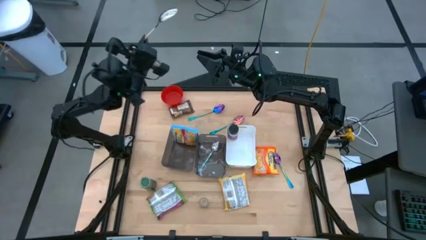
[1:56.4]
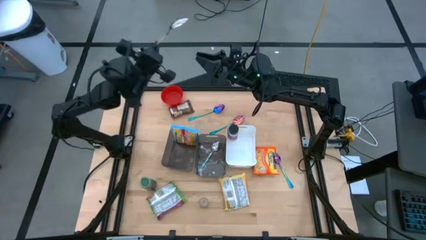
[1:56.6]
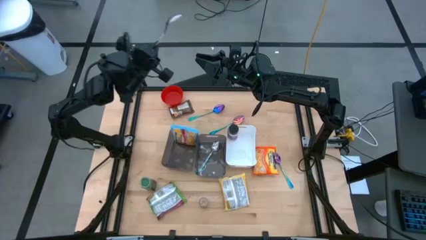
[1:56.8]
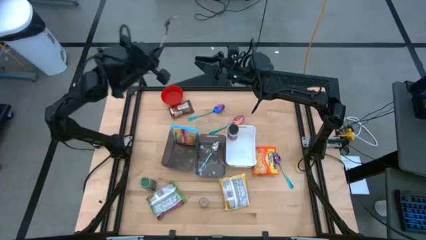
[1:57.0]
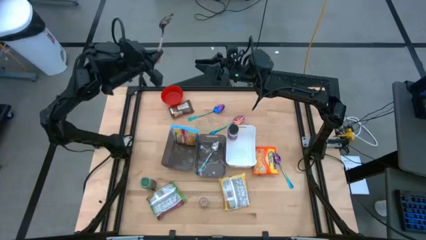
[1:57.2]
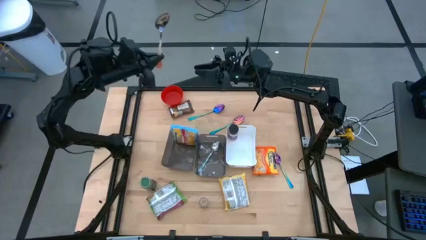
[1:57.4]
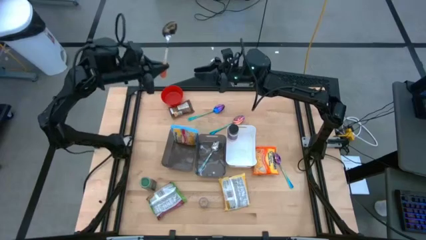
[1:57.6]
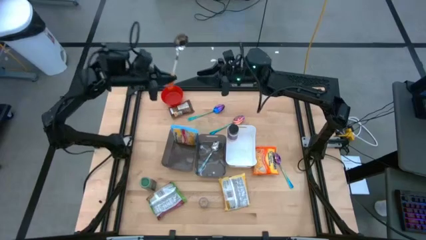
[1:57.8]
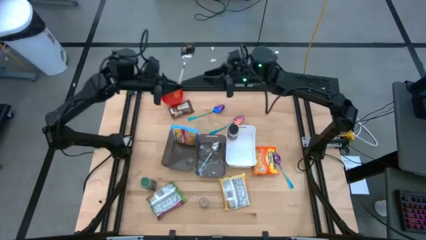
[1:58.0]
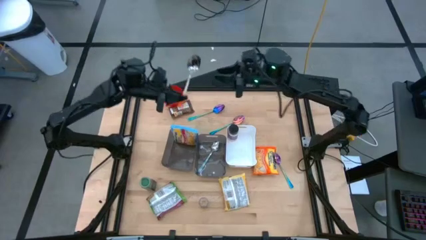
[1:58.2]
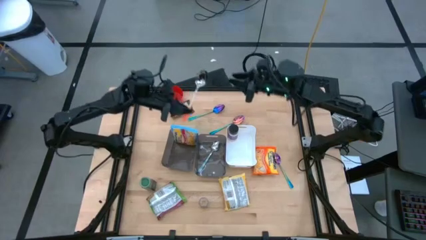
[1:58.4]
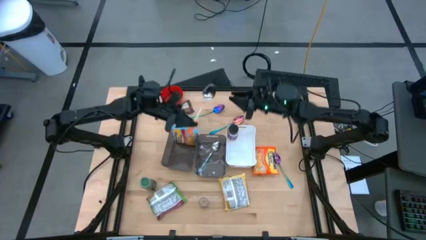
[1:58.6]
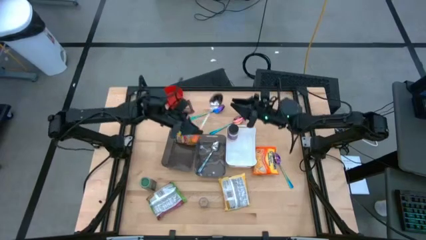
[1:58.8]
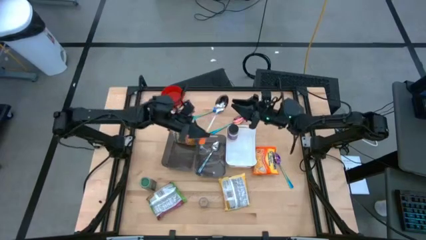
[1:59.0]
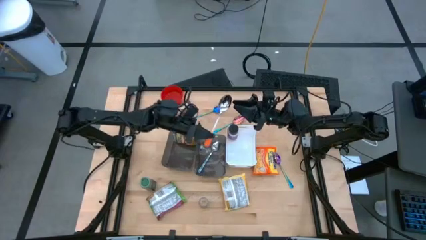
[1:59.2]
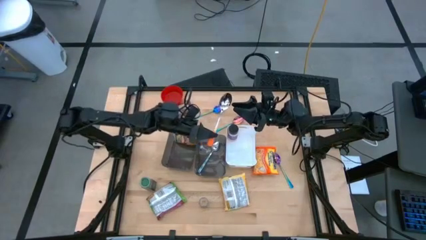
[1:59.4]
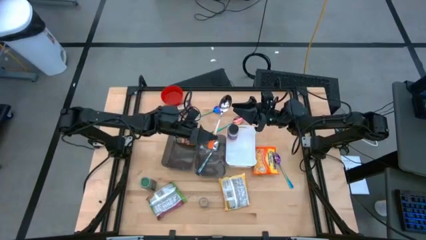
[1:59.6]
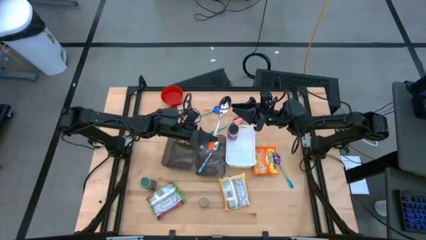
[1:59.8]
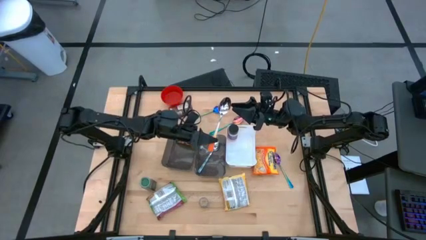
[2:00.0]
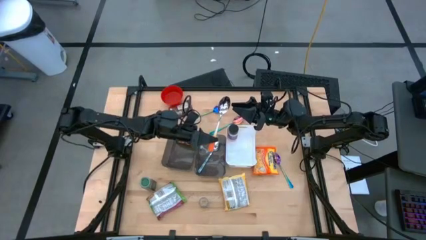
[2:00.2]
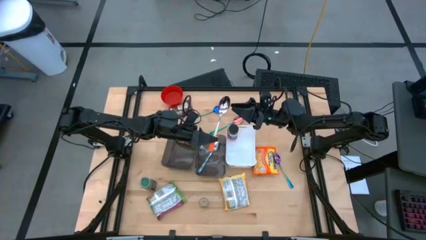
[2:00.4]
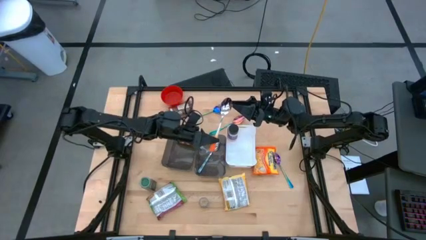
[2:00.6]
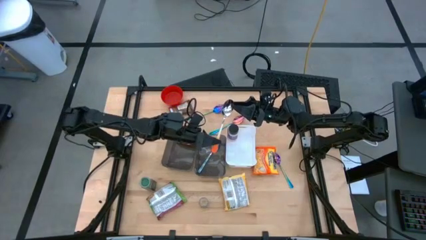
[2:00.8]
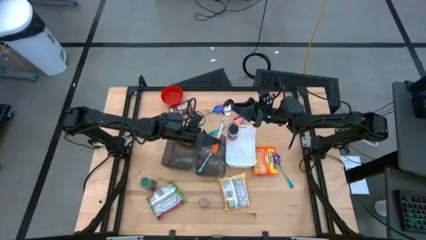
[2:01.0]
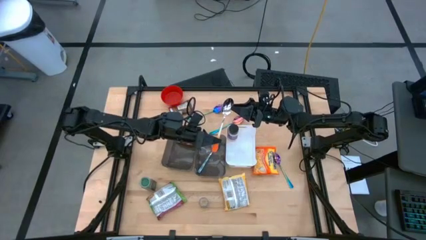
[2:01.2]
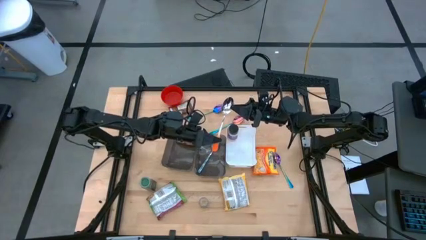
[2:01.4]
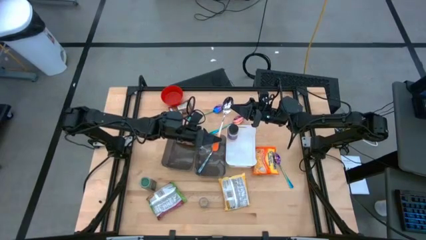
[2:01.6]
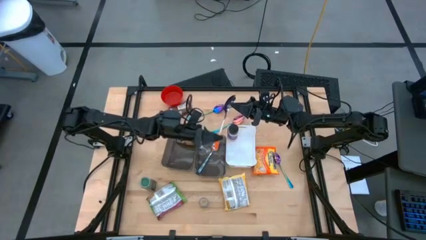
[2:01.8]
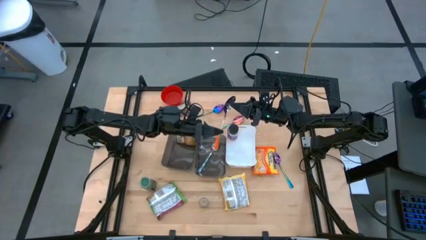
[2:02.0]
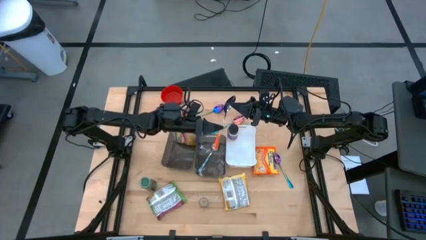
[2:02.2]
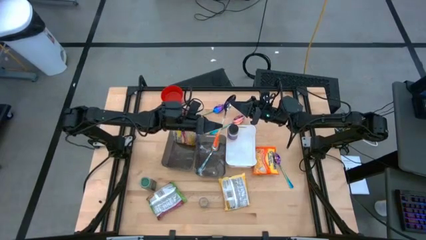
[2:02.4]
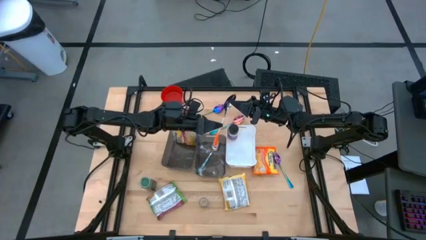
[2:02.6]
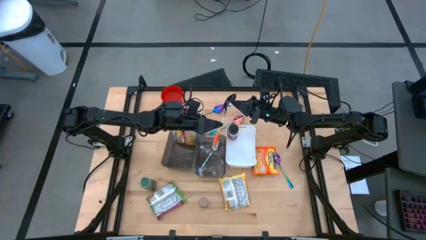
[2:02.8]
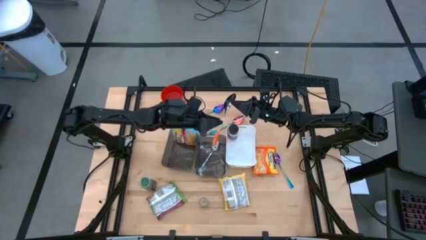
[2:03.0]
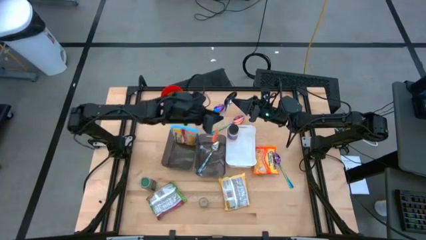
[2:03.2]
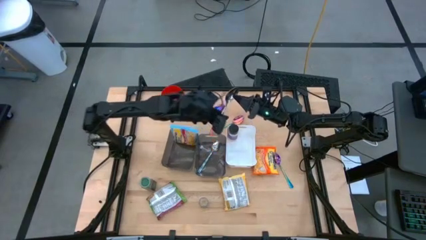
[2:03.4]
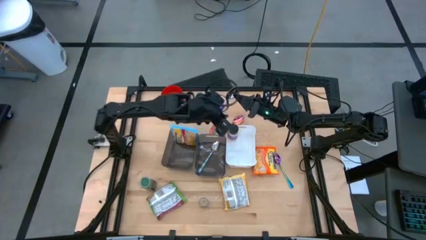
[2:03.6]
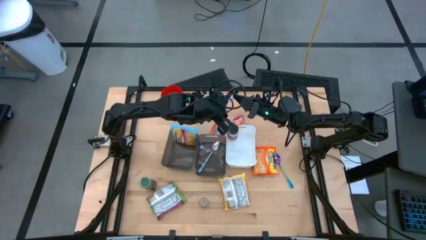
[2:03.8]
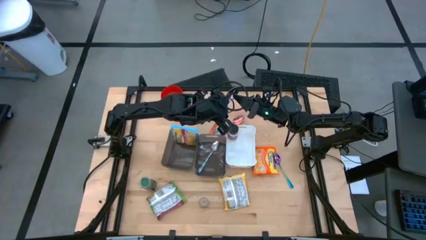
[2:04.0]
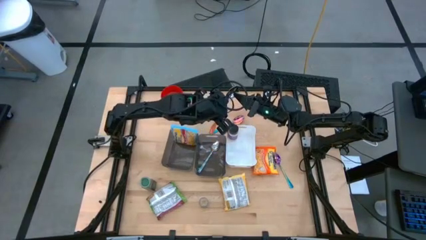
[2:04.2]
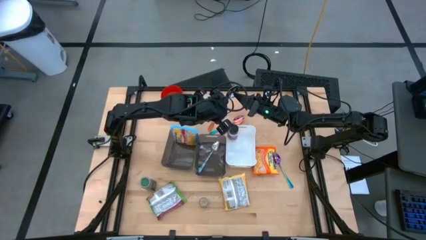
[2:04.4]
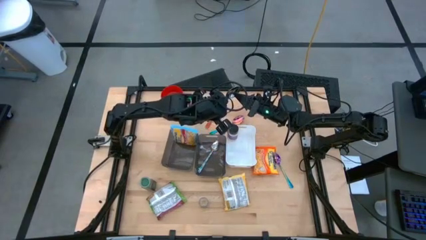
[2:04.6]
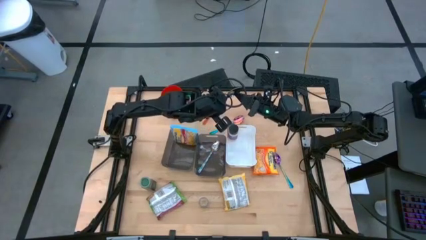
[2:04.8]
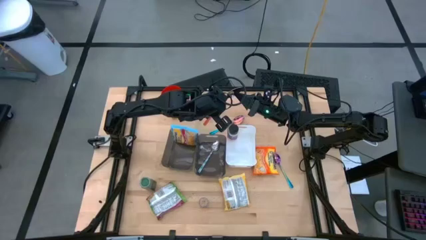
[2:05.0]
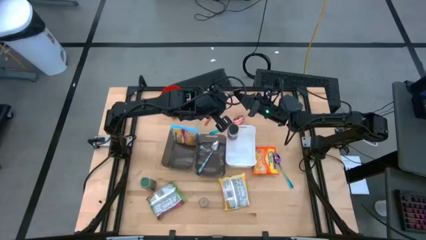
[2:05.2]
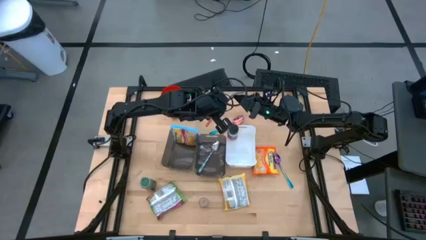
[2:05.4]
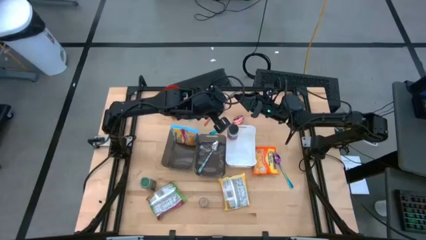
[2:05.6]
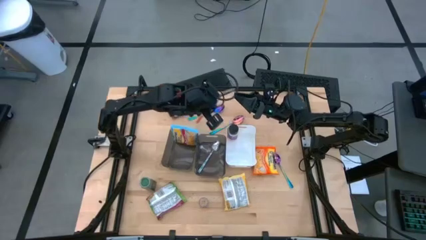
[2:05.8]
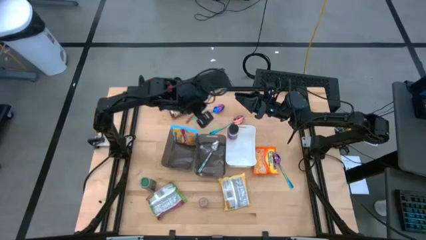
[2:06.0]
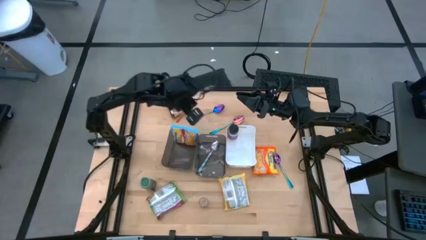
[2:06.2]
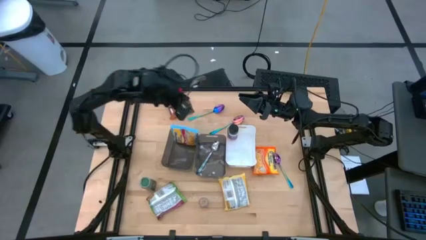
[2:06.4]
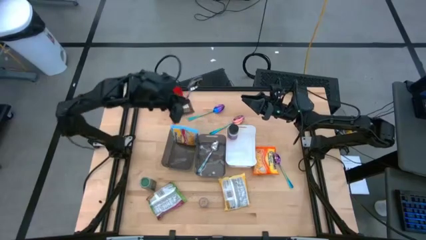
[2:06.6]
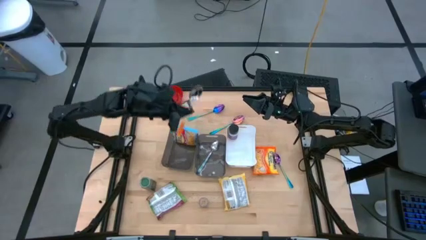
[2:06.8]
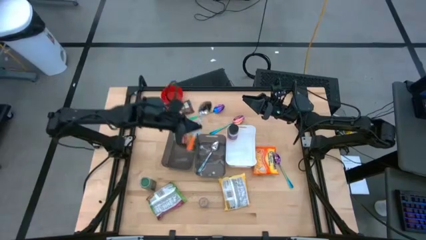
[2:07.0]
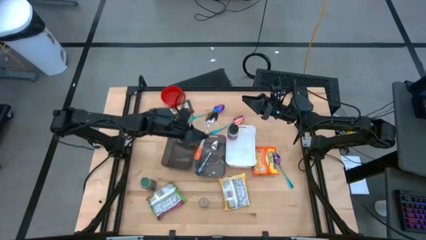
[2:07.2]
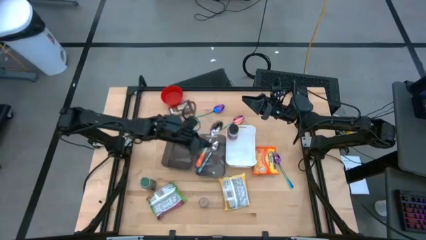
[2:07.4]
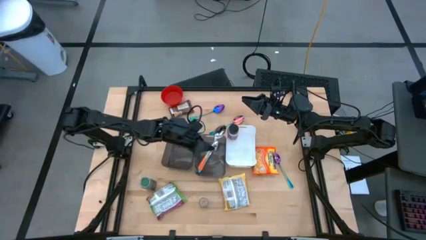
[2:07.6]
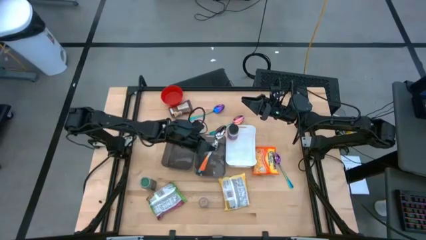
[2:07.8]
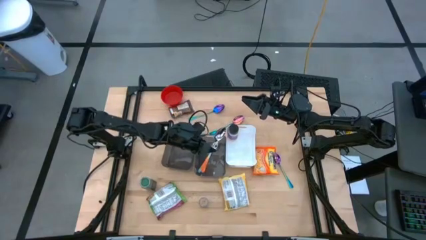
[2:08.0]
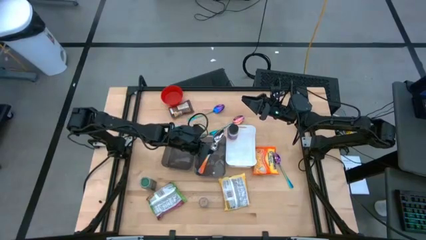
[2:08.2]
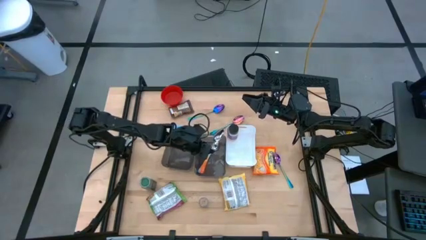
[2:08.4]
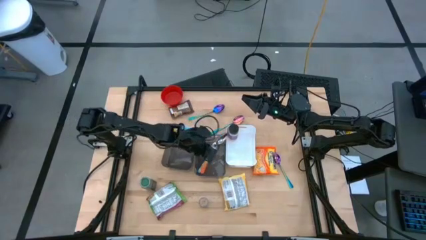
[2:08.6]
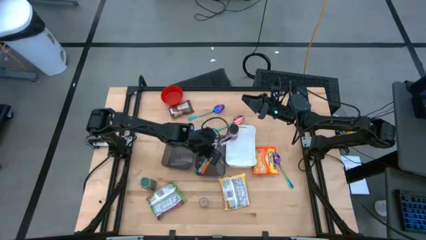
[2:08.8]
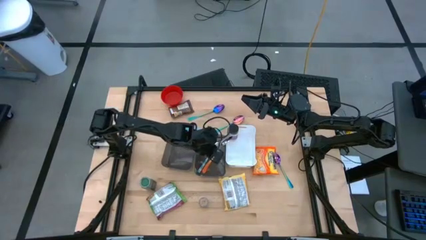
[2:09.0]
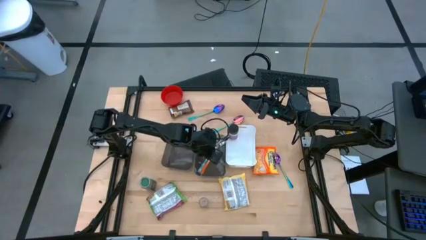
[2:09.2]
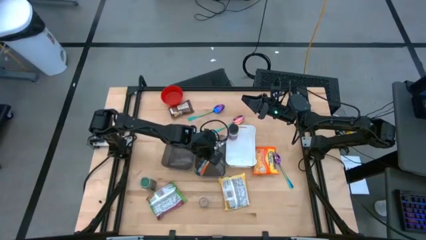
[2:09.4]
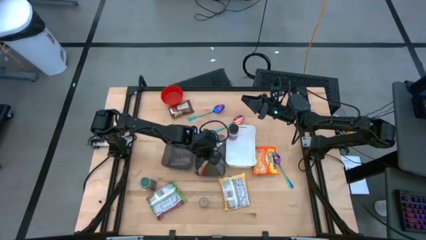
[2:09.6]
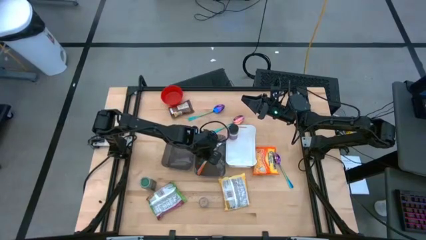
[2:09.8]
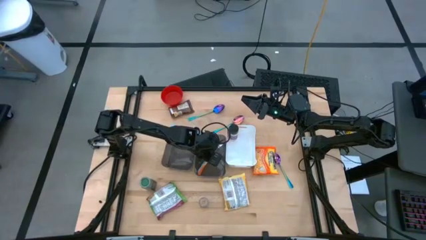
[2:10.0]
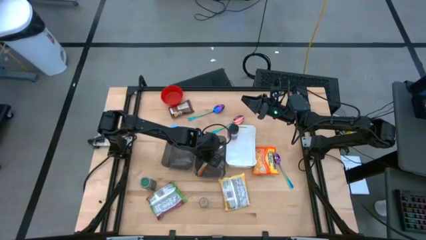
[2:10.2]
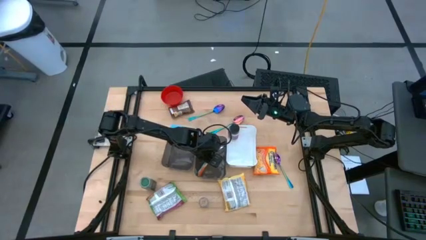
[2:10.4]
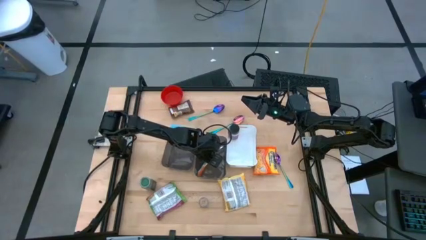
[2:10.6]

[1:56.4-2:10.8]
Task: Pick & Place Food Item
Put the orange spoon into the right gray bin

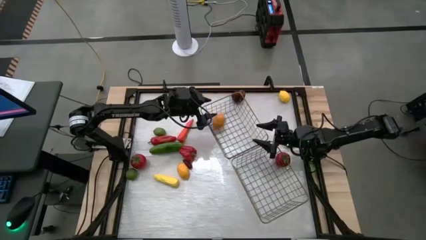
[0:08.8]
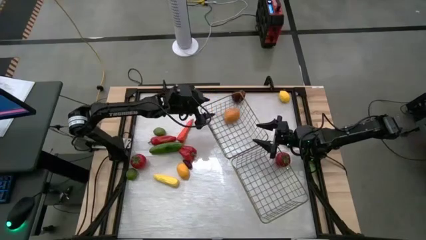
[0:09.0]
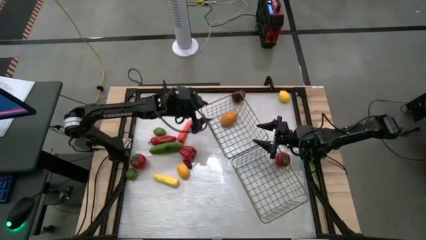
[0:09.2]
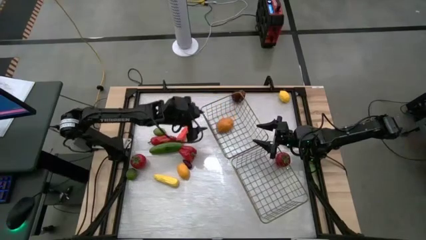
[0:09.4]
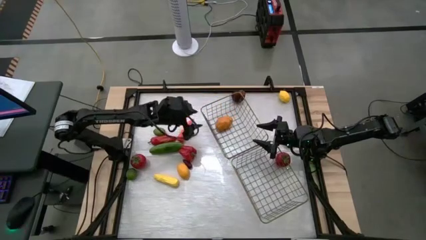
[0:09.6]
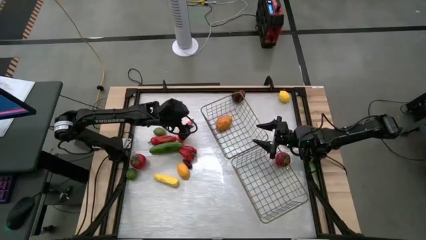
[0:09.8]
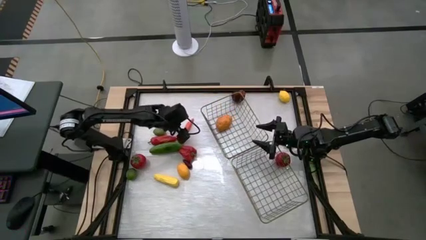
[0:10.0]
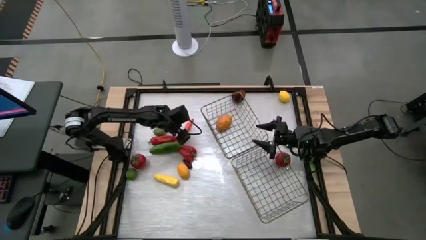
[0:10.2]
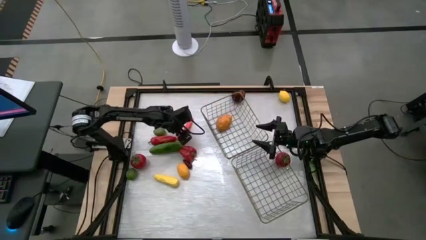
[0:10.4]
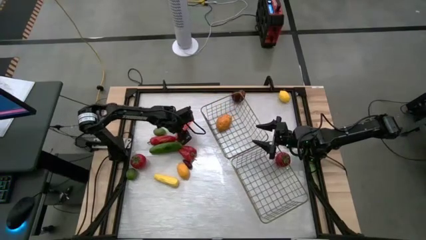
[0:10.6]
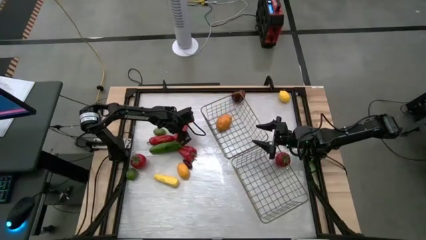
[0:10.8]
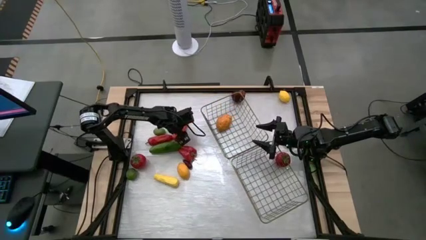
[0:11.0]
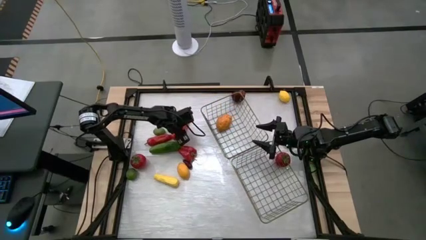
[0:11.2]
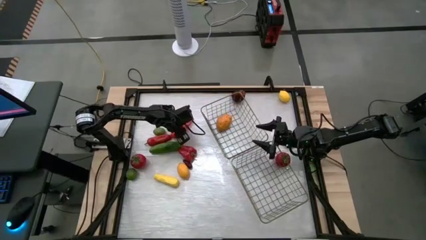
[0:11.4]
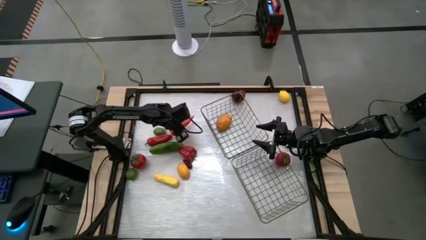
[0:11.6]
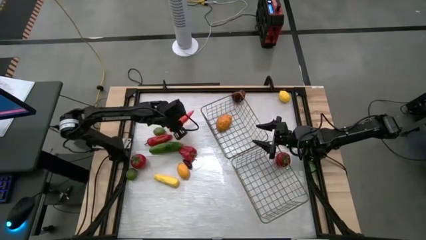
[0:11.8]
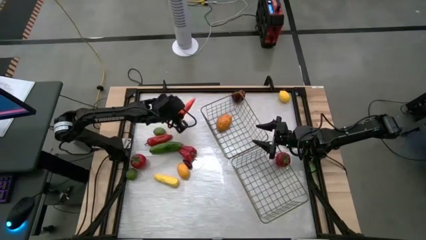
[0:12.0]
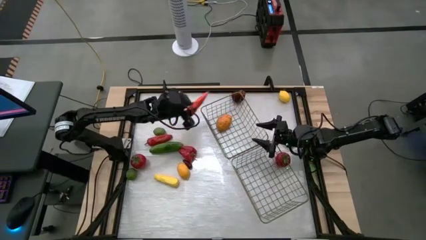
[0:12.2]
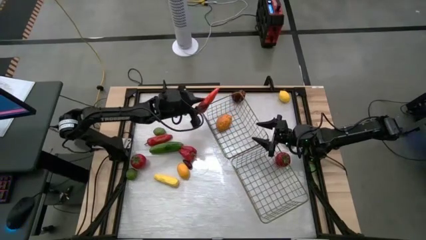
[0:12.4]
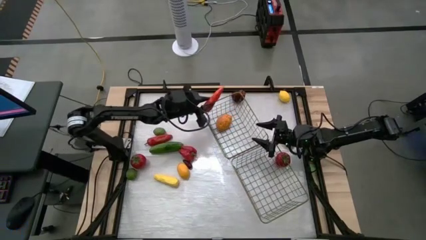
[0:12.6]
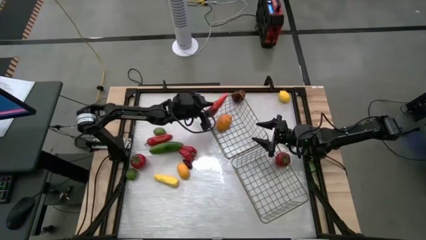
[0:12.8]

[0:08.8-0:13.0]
Task: Sort produce into baskets
Put the carrot into the left wire basket
